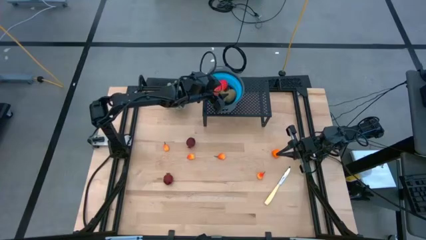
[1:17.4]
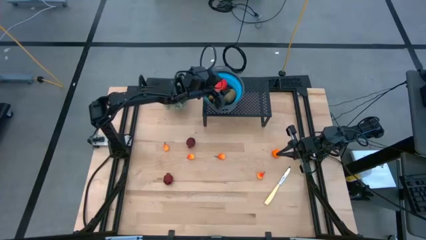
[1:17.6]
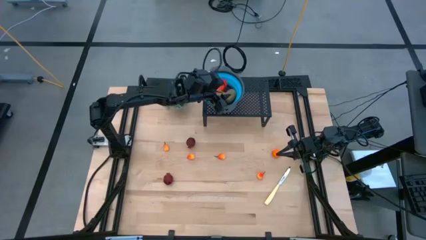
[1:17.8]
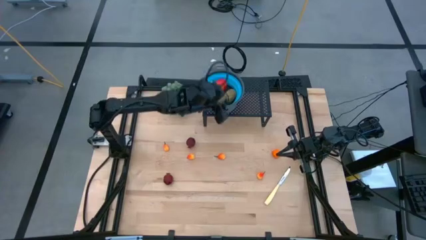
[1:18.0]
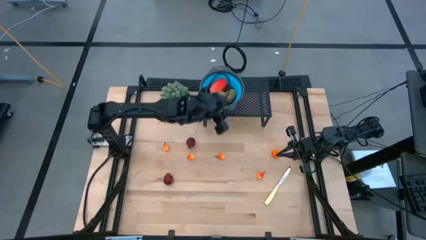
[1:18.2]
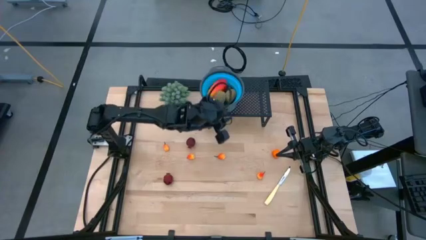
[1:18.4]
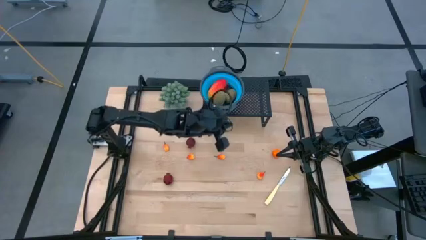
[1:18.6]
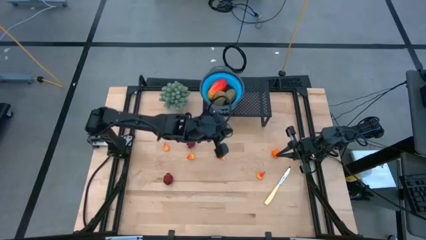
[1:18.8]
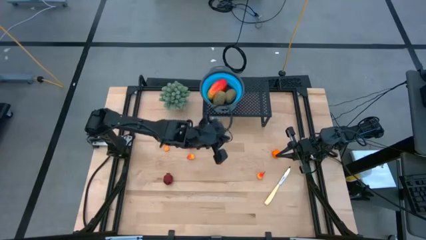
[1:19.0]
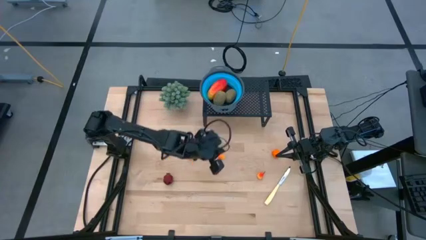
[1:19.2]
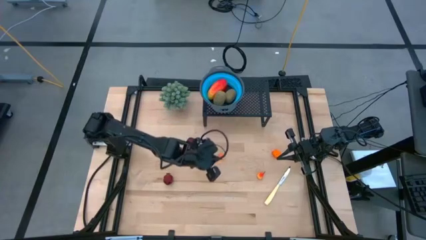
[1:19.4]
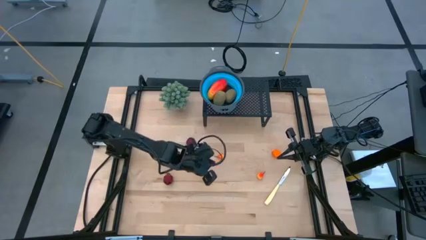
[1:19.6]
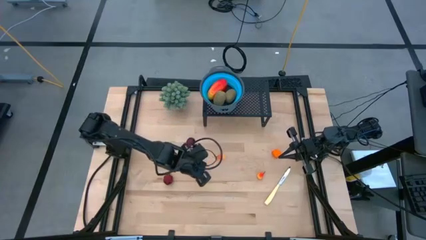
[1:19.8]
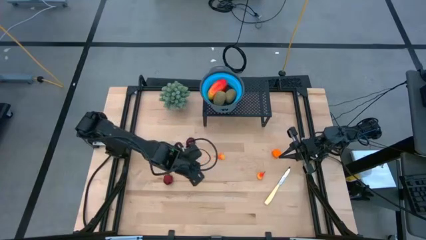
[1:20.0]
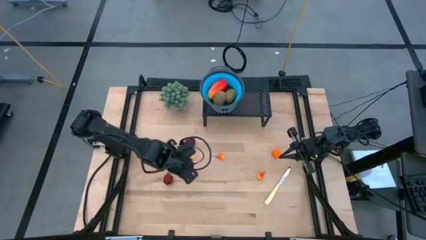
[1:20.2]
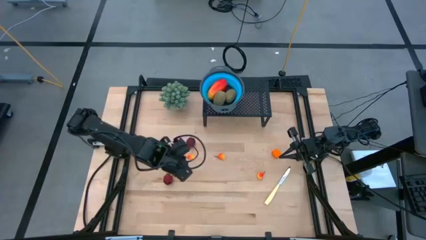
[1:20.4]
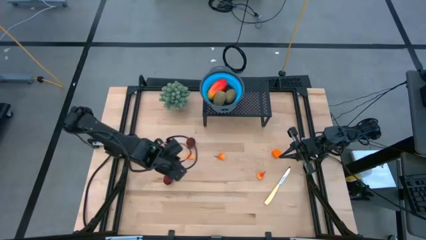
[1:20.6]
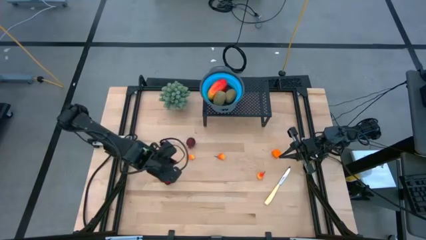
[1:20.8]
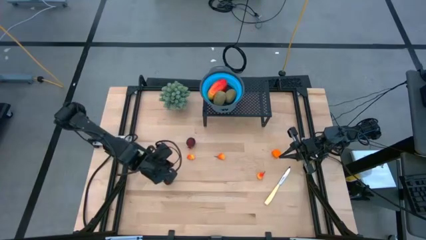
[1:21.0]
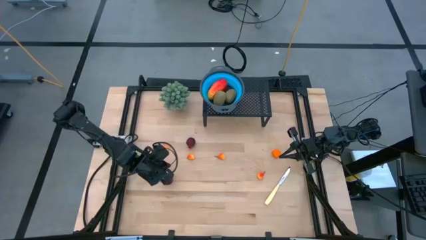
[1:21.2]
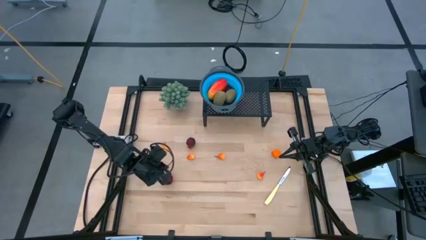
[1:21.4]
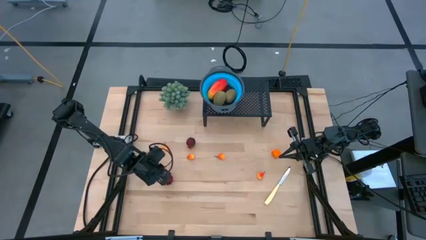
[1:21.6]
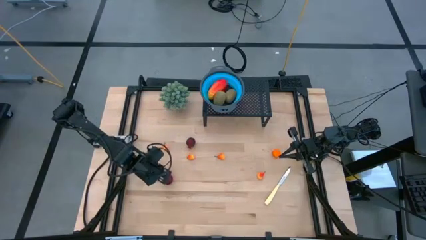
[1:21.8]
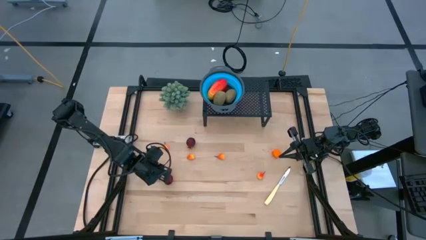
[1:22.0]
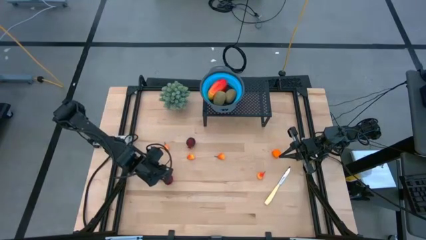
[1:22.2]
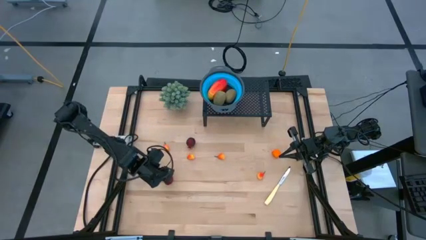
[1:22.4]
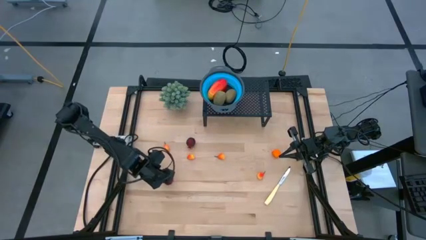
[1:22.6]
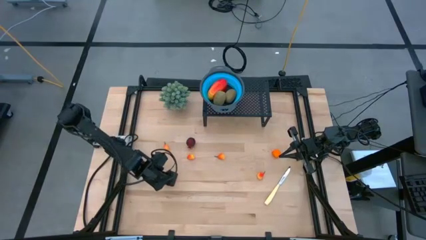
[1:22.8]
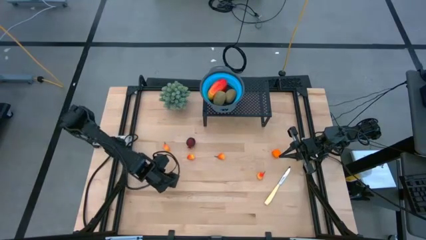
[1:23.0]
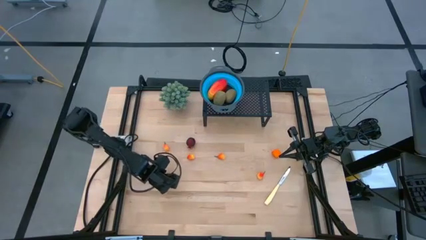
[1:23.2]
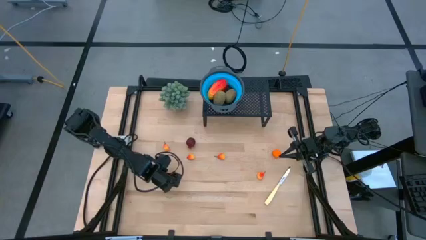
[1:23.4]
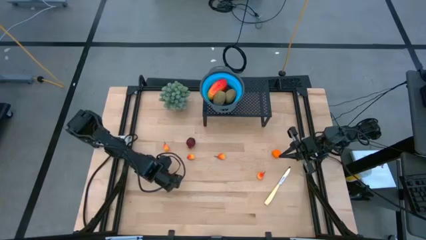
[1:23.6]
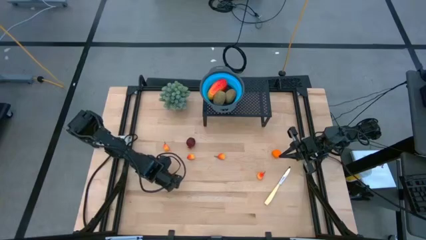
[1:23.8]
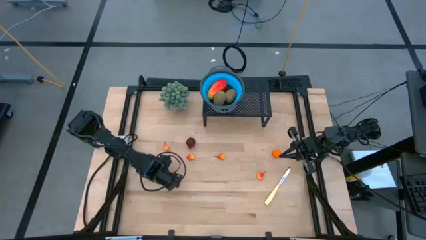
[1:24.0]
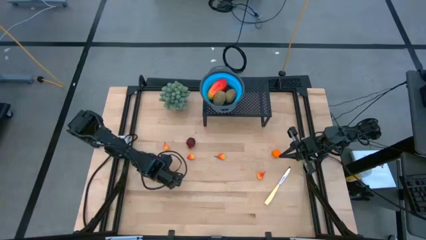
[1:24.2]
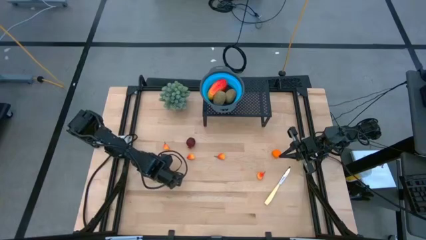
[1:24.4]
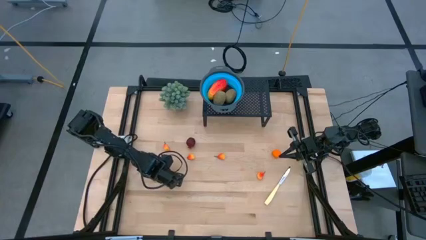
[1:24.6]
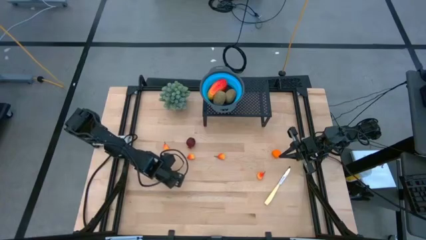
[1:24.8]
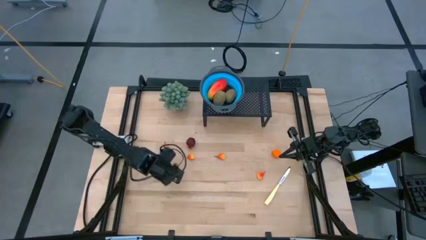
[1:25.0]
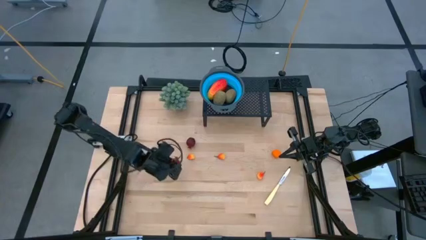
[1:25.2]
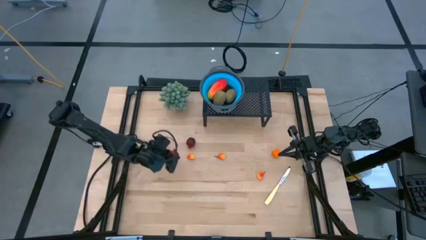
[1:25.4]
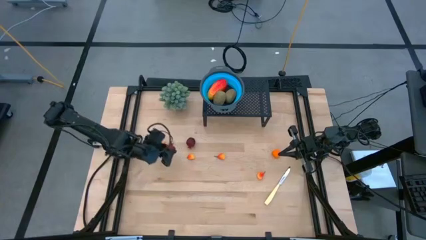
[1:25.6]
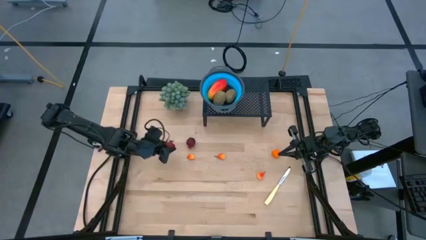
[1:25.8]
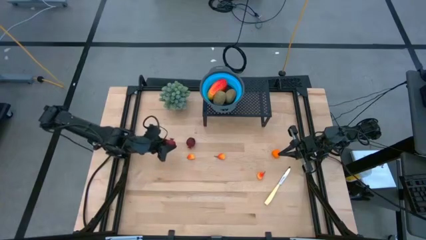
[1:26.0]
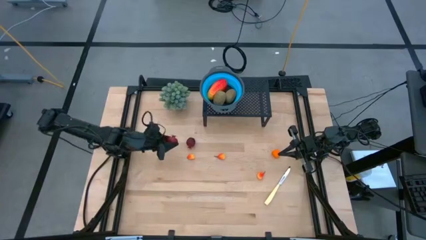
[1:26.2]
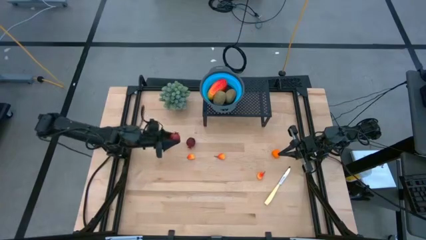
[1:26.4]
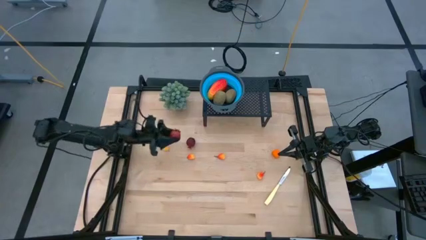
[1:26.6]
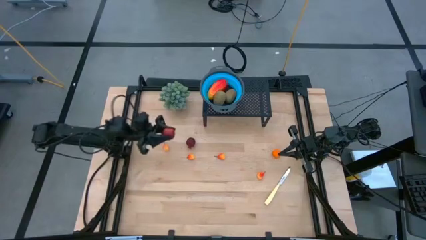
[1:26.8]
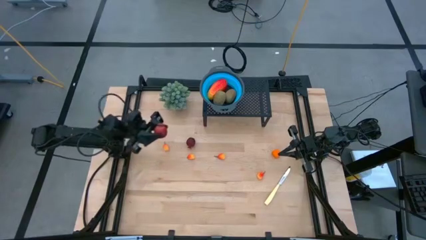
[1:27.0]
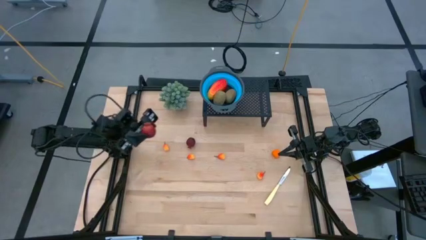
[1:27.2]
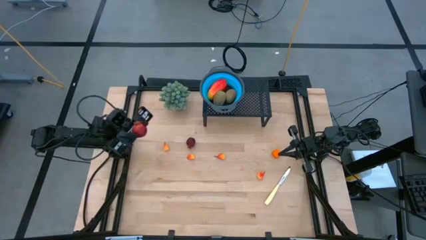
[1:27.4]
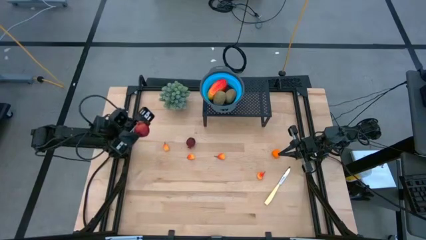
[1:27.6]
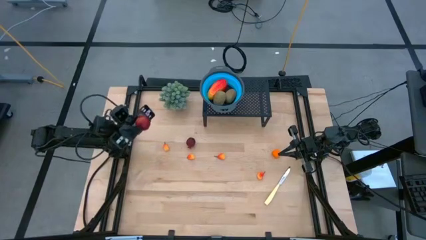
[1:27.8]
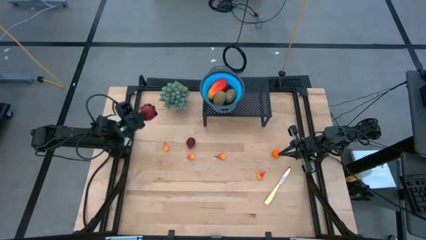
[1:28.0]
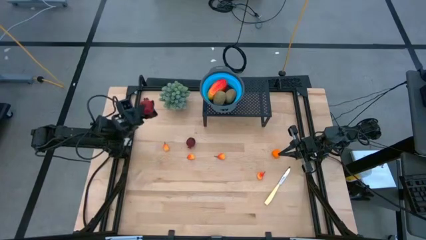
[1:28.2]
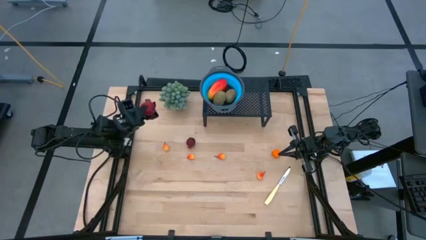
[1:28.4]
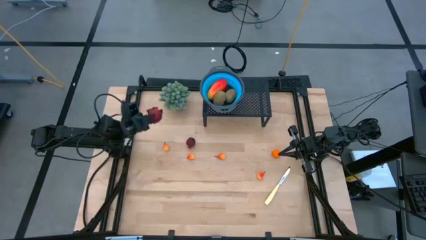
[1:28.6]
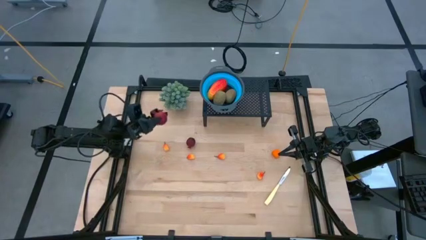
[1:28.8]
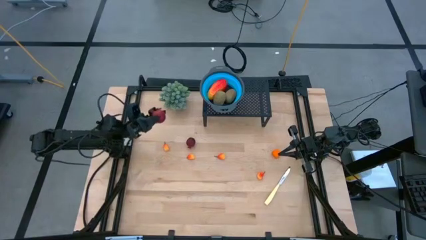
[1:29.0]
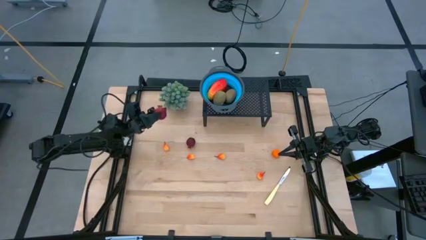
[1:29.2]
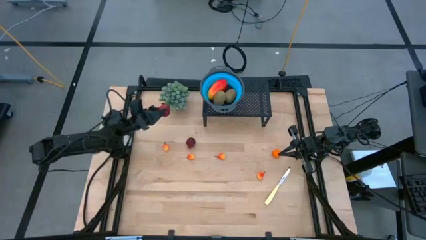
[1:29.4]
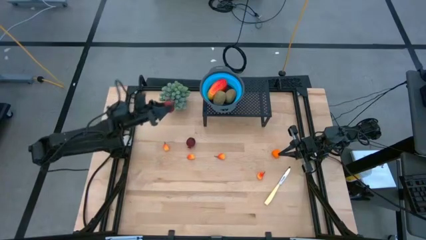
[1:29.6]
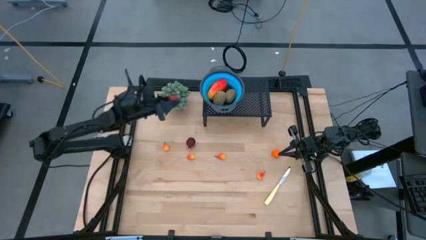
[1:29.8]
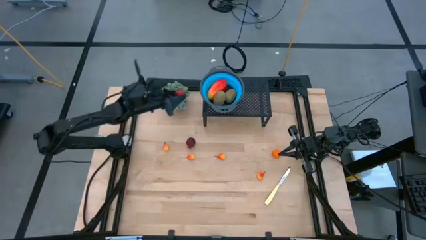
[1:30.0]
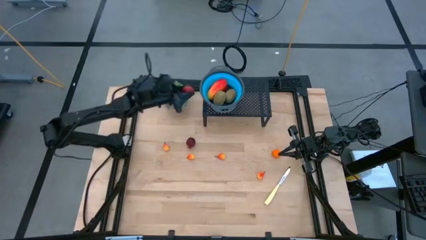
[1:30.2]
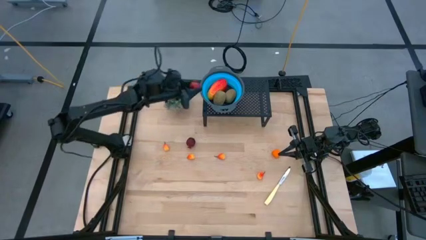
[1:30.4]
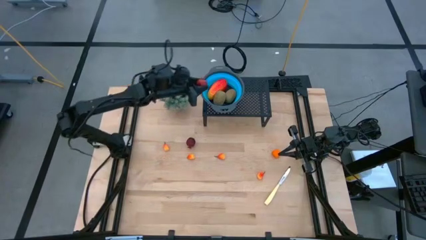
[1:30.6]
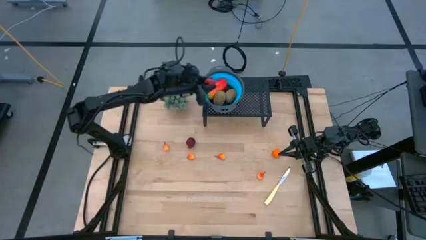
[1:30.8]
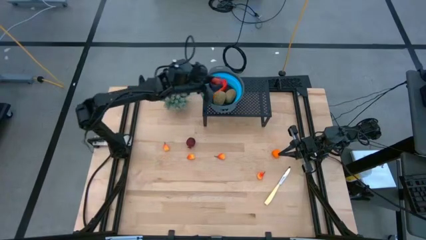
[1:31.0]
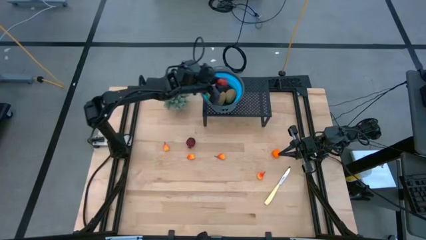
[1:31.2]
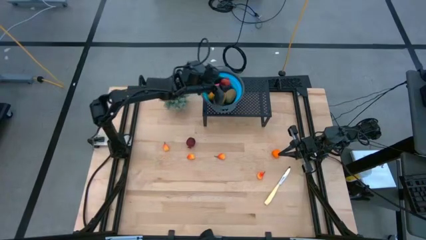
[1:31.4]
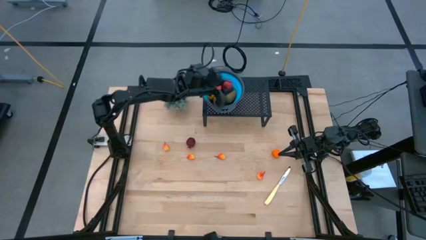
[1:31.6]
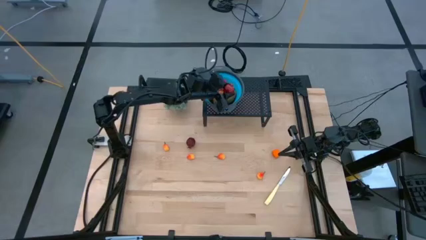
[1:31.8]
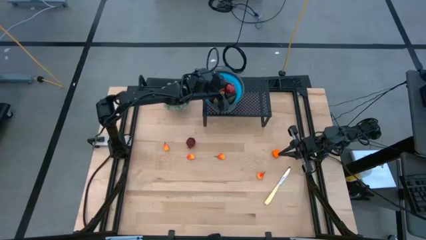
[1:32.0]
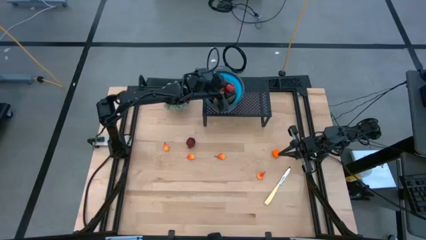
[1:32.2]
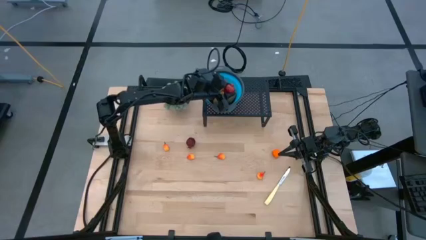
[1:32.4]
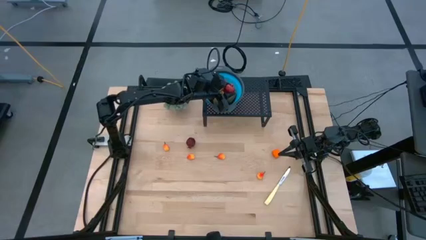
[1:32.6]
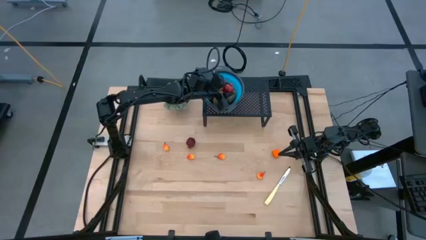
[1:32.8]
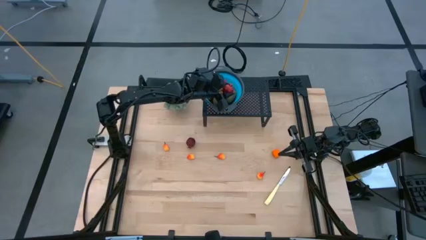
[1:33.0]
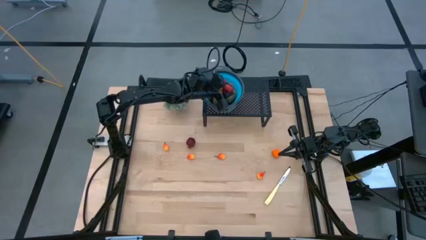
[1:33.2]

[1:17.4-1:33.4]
Task: Pick & Place Fruit
Put the red pomegranate into the blue strainer bowl on the shelf
